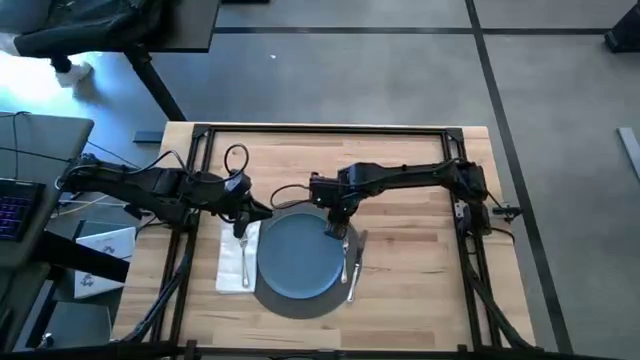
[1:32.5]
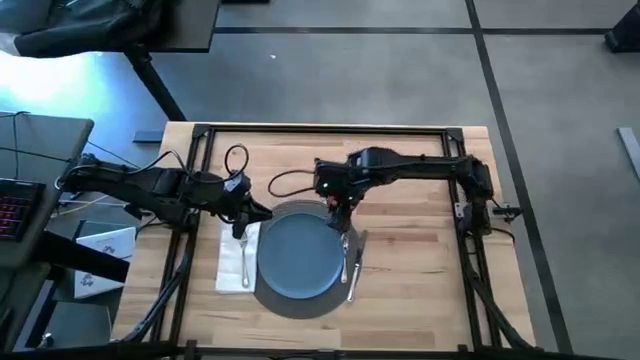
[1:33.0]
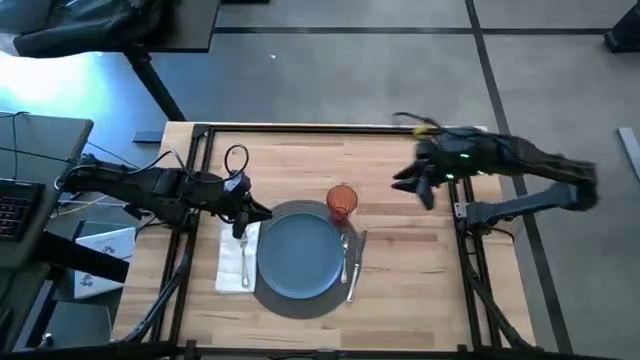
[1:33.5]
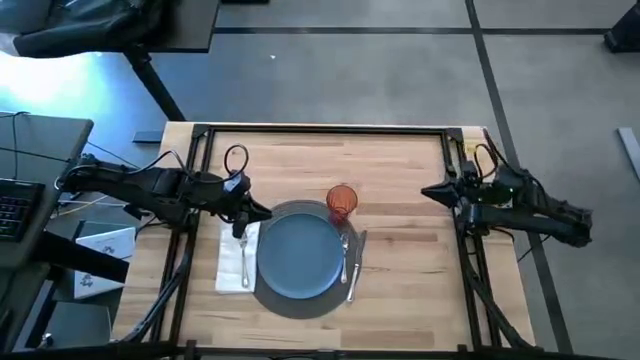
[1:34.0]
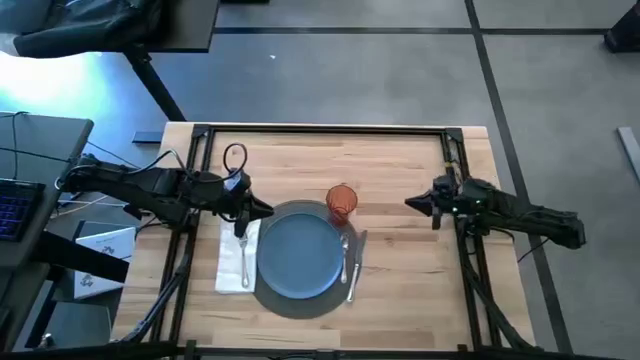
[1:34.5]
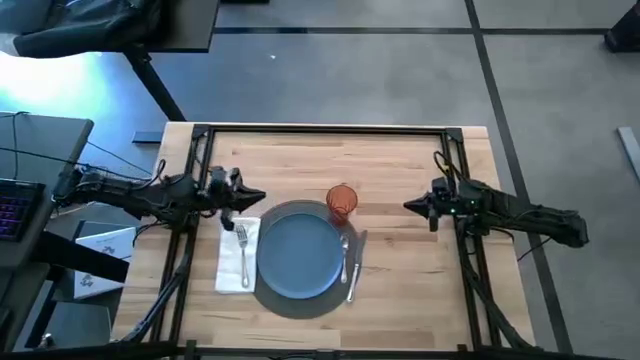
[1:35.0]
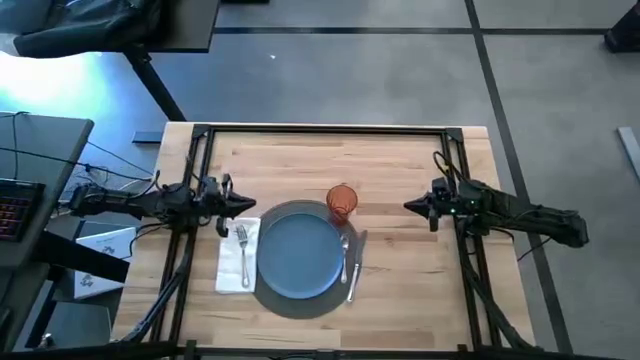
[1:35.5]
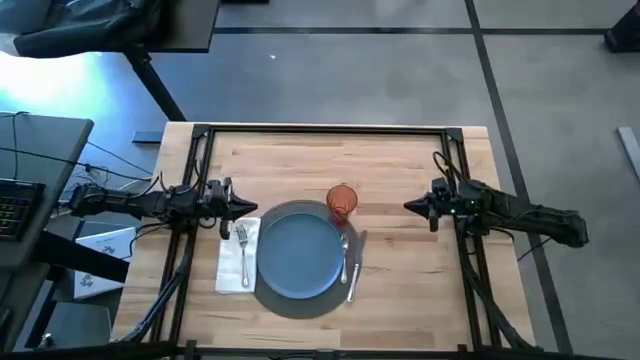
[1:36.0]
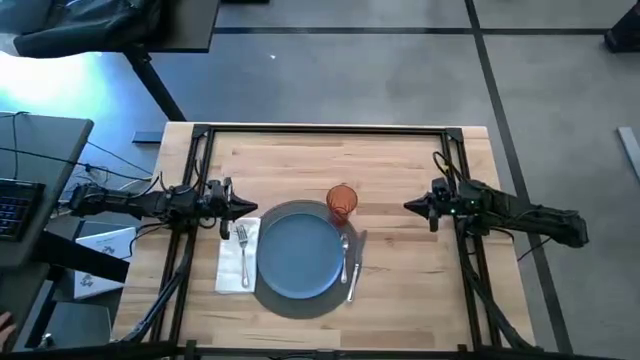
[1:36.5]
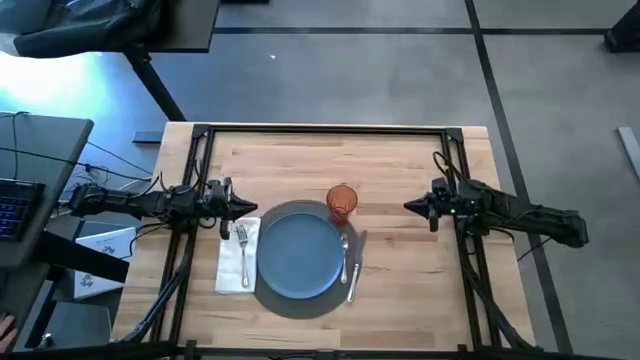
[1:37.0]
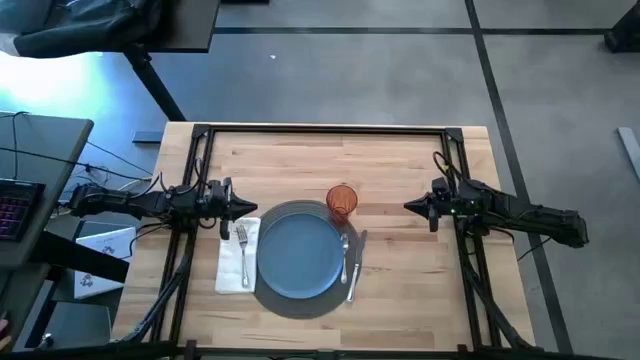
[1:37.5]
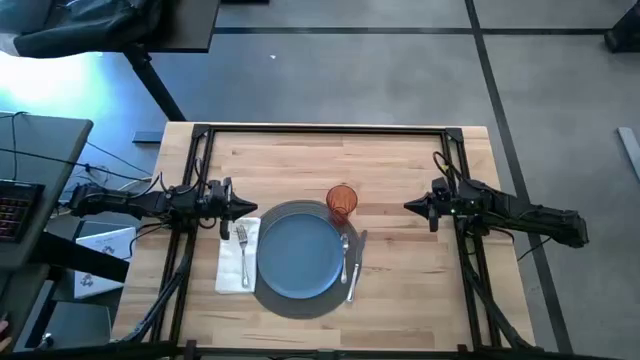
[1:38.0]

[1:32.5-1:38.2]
Task: Set table place
Return to Home Position

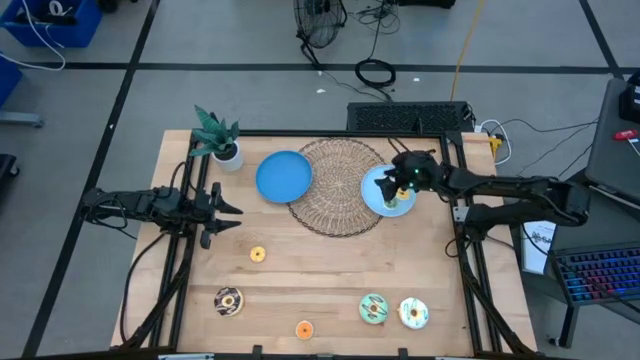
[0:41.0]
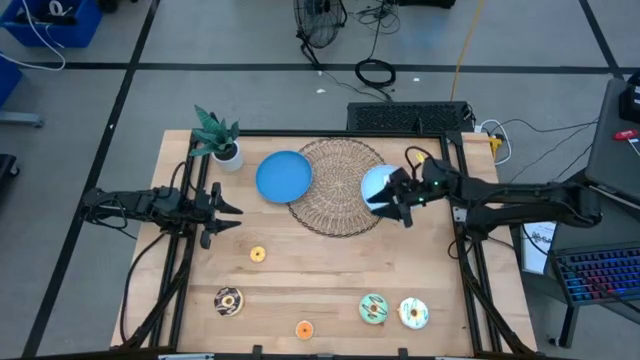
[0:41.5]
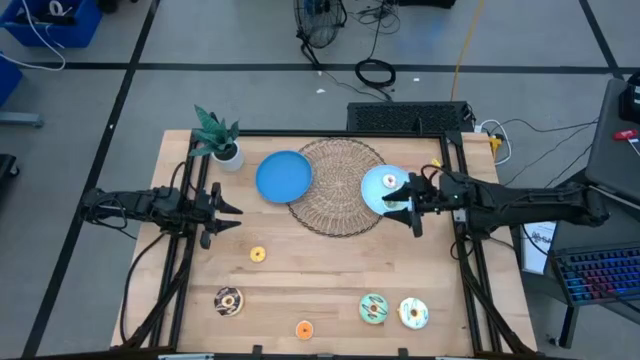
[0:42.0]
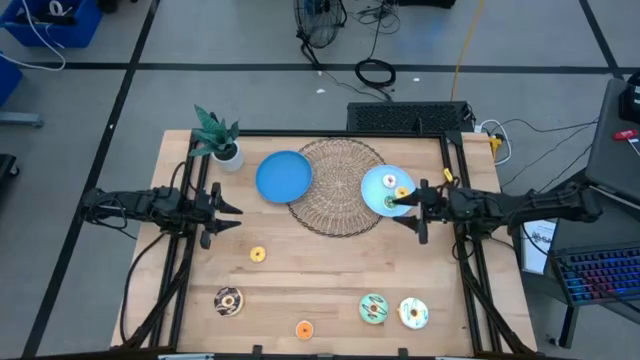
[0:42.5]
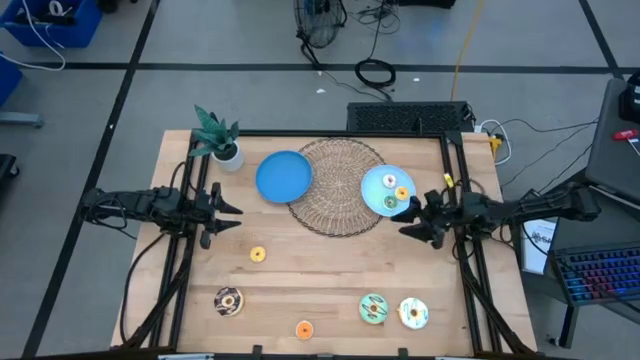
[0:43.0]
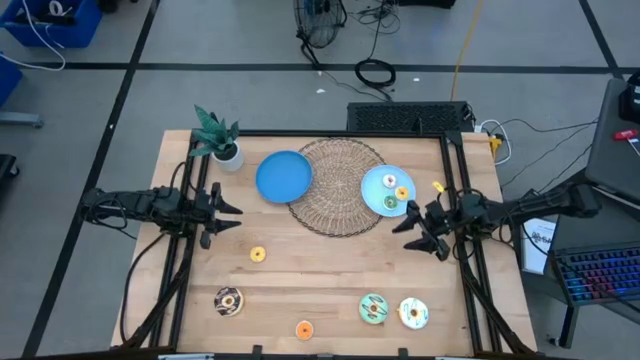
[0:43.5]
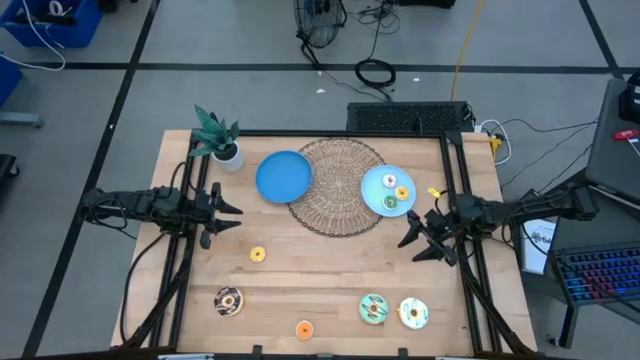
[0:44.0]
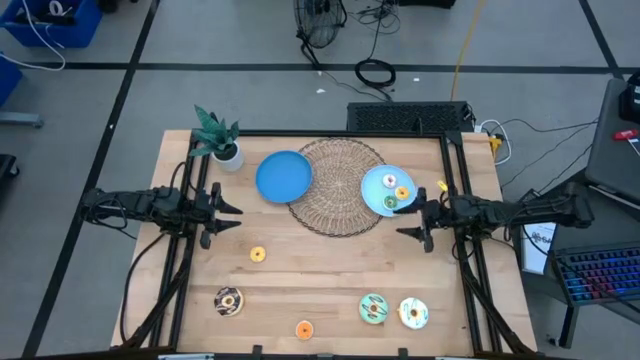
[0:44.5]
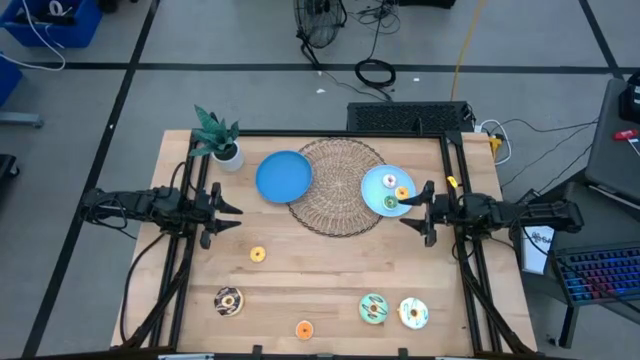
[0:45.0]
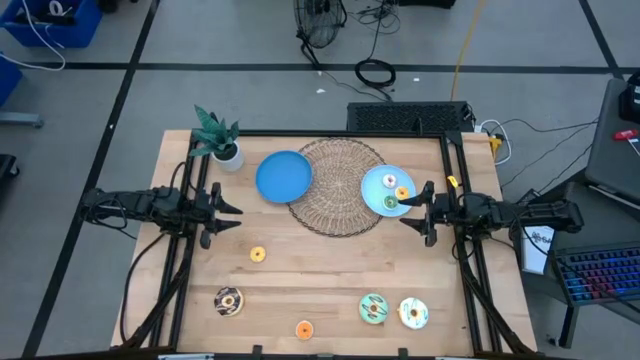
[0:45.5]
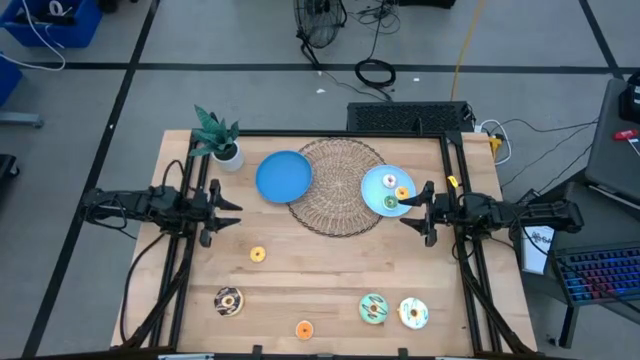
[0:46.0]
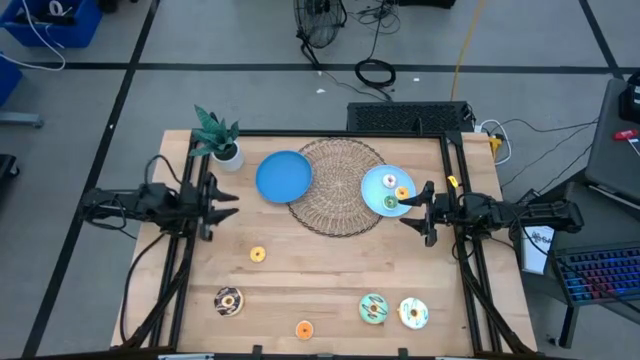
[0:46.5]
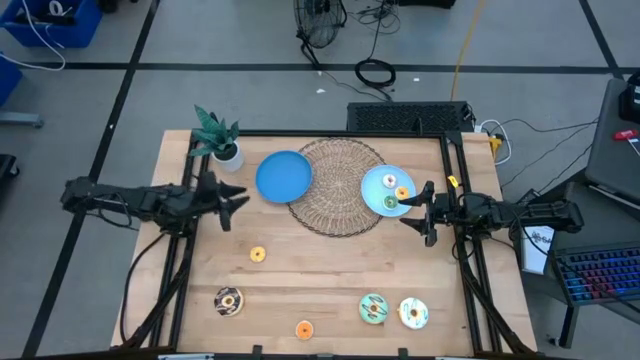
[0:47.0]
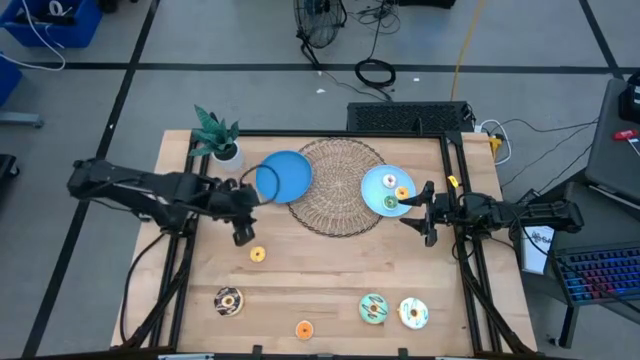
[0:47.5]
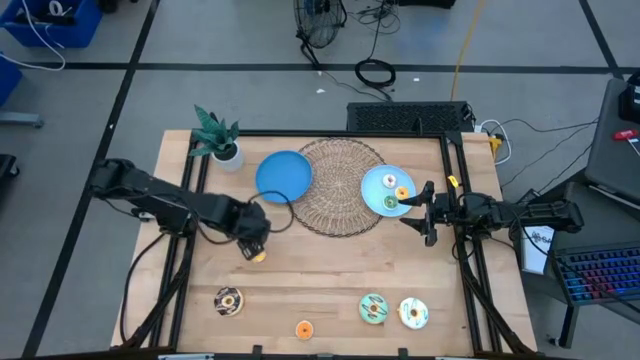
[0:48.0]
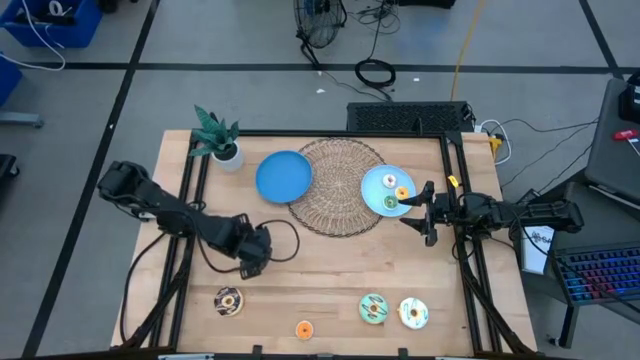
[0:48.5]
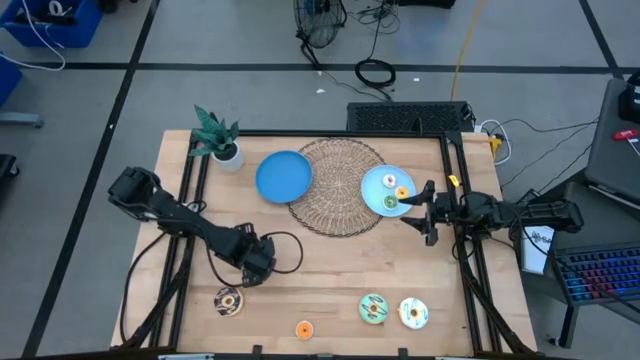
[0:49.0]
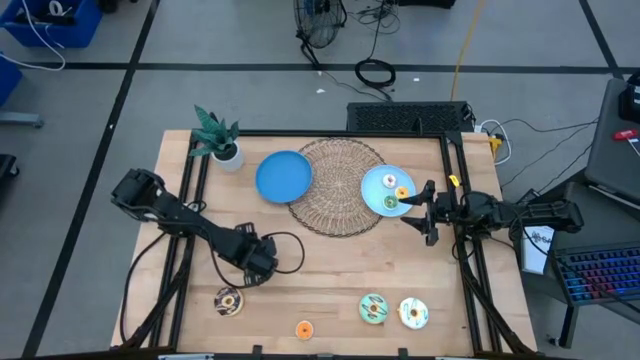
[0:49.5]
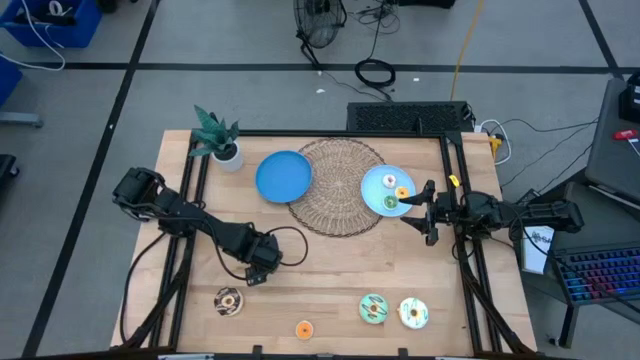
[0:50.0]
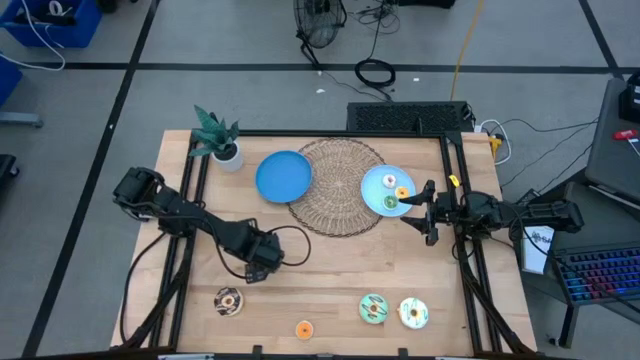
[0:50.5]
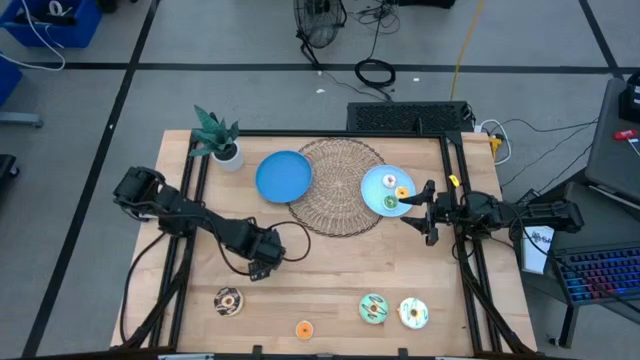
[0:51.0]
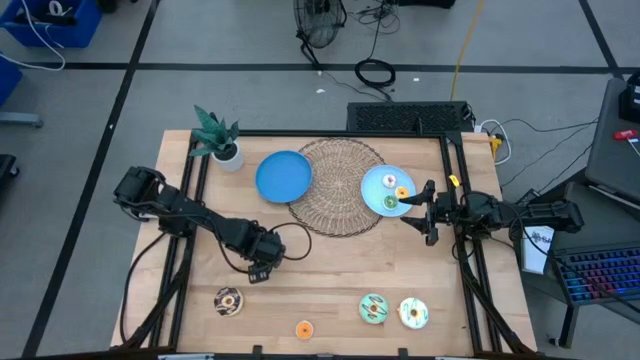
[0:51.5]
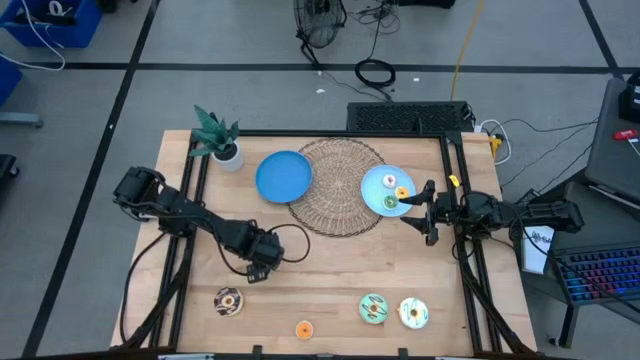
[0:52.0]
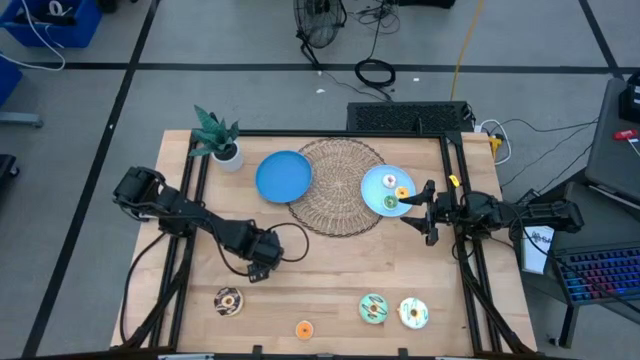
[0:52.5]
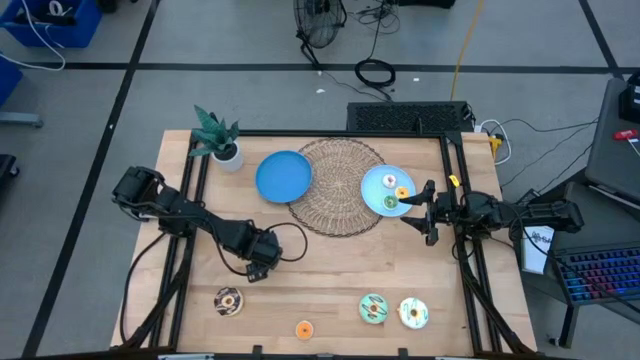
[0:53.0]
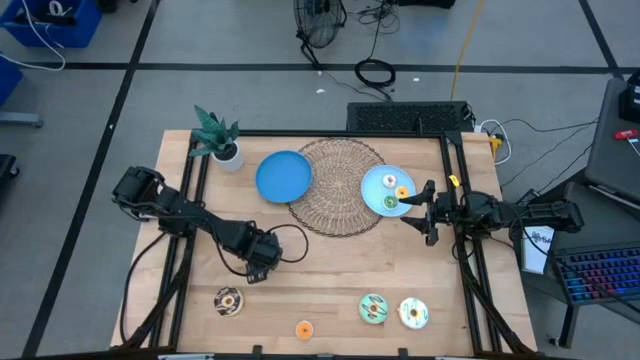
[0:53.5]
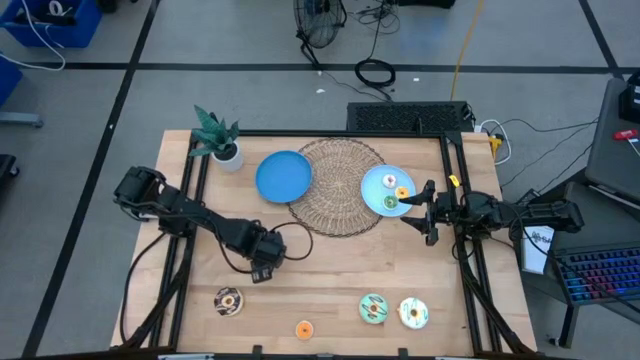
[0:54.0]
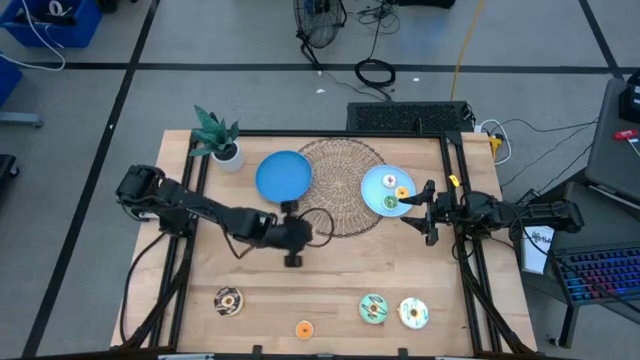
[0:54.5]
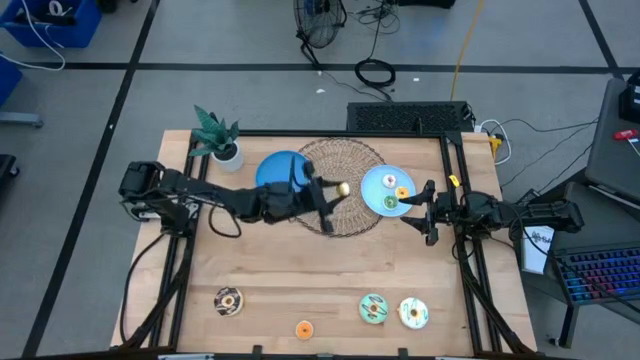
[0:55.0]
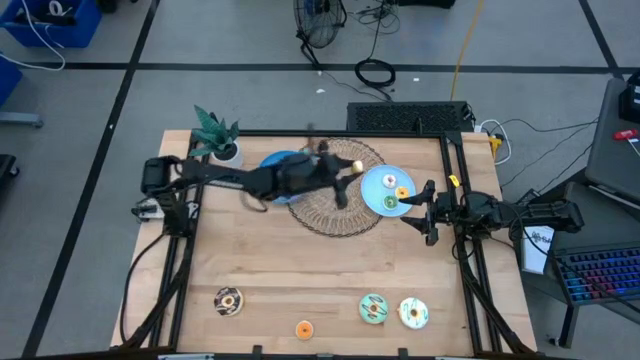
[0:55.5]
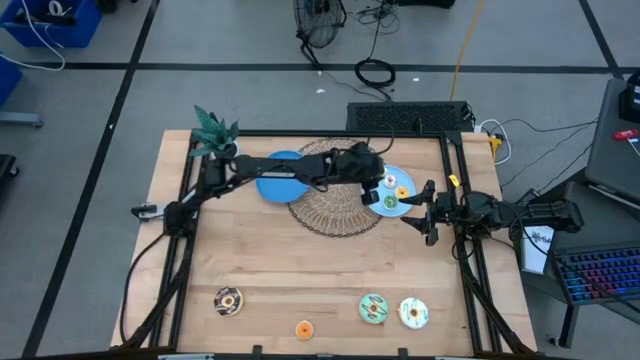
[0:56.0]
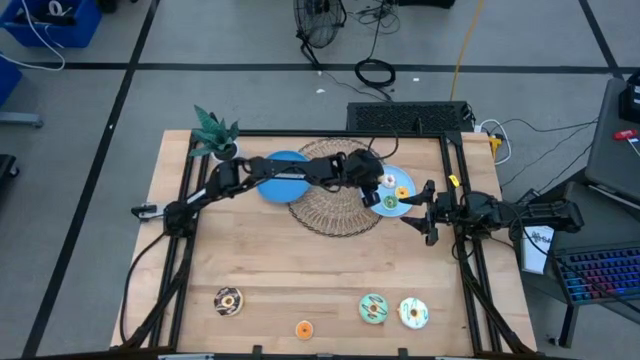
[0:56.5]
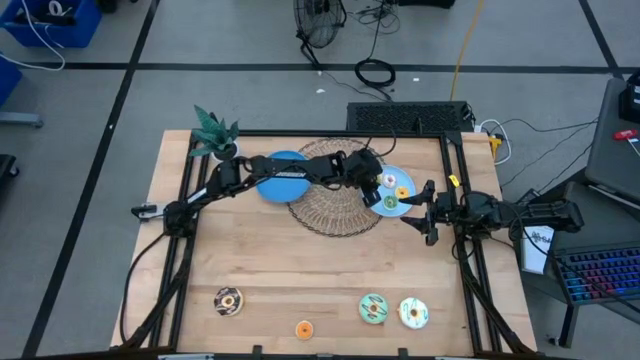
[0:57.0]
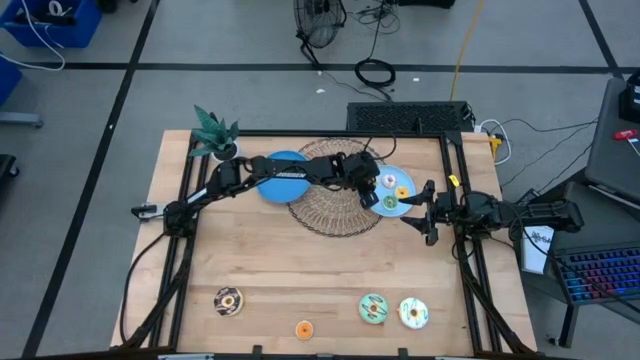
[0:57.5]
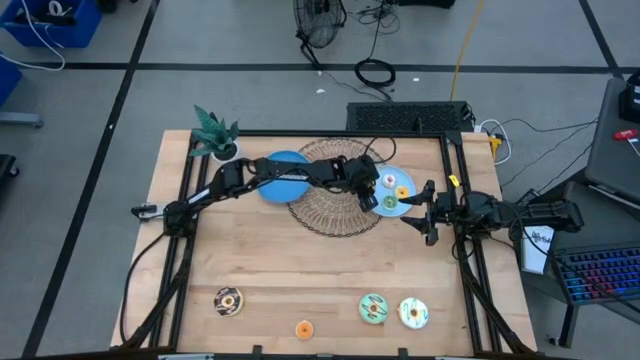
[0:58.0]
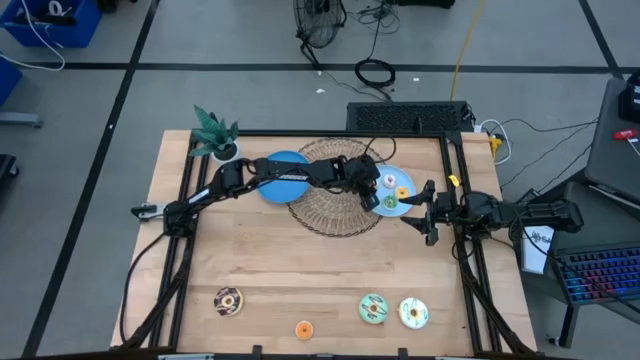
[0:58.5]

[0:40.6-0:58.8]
Task: Pick & Place donuts
Put the small yellow donut on the light blue plate
